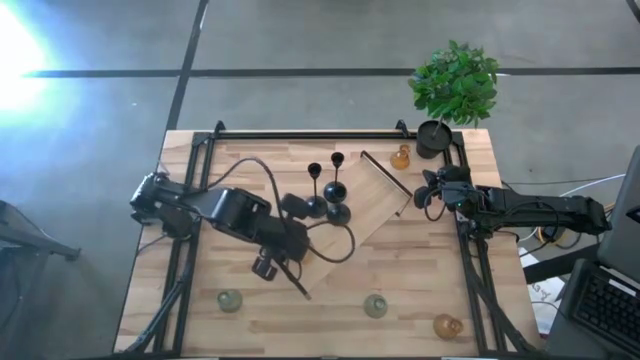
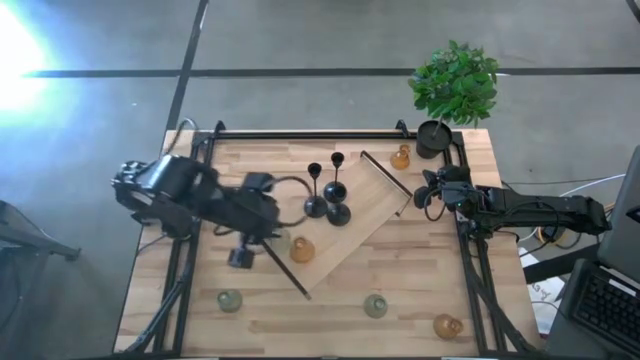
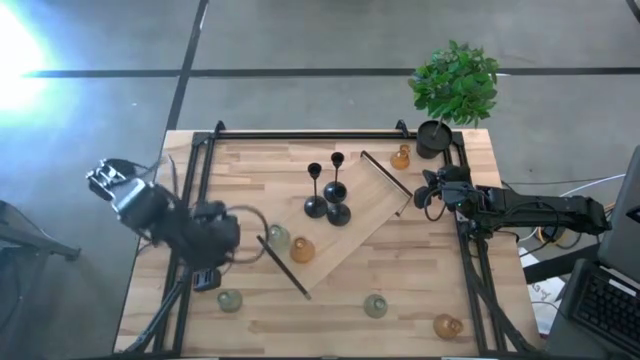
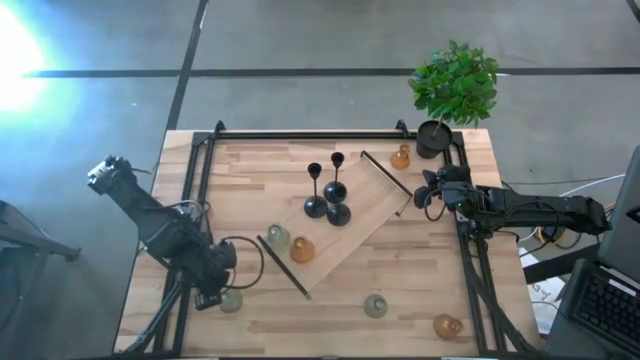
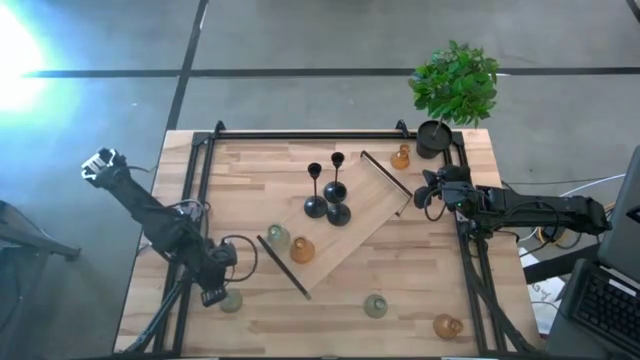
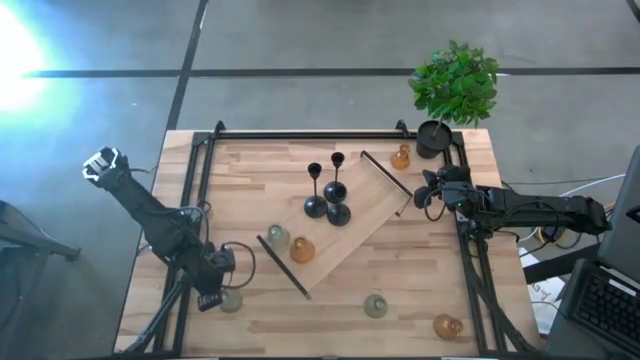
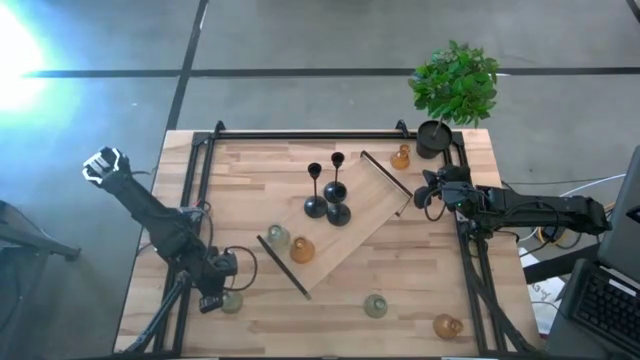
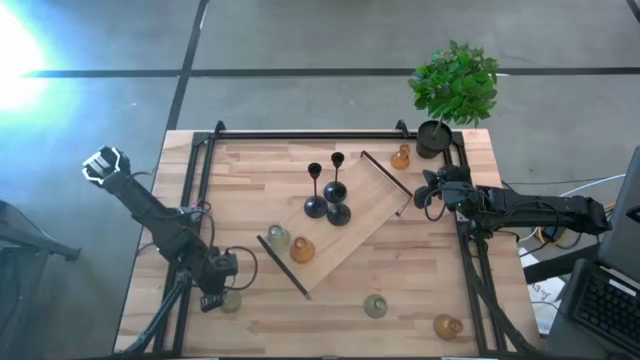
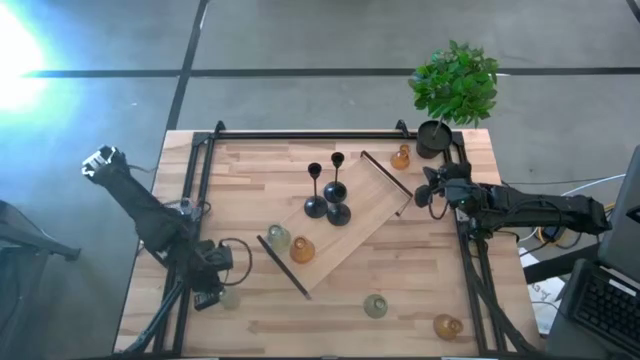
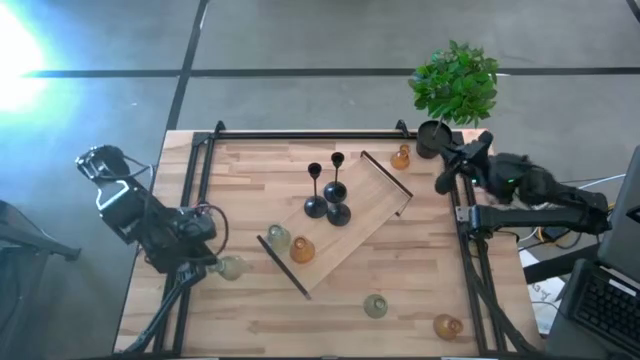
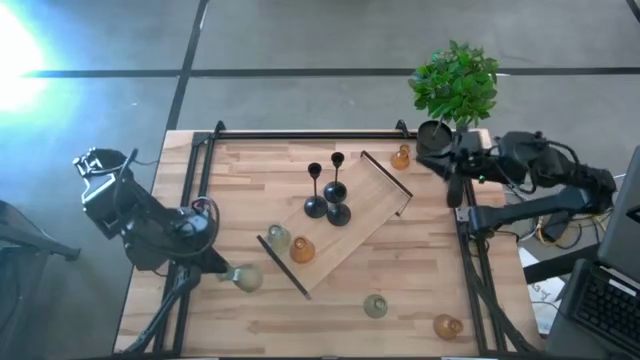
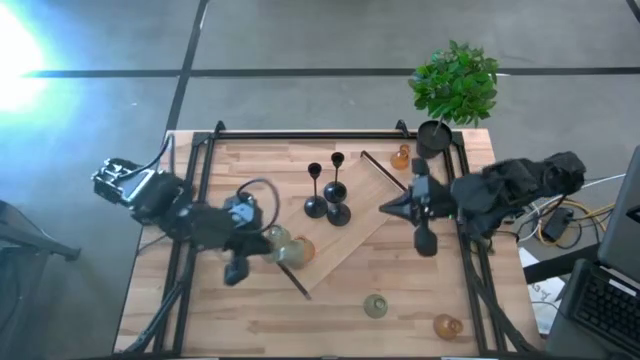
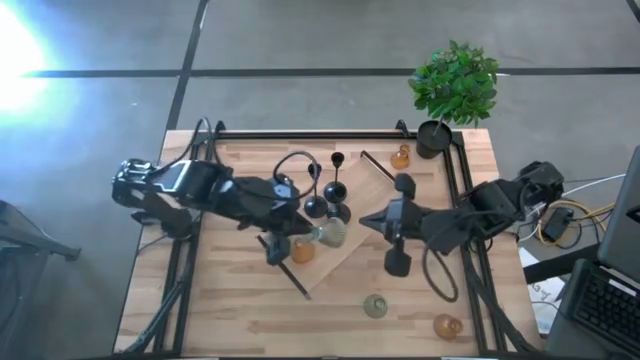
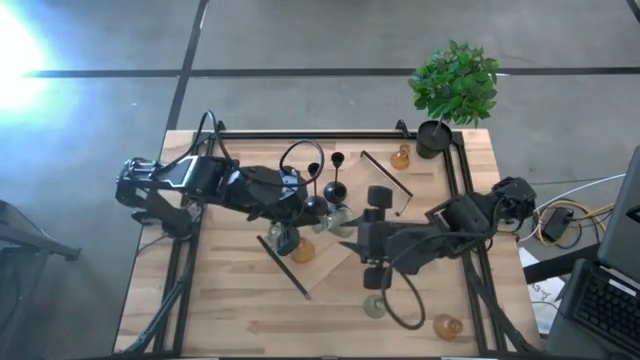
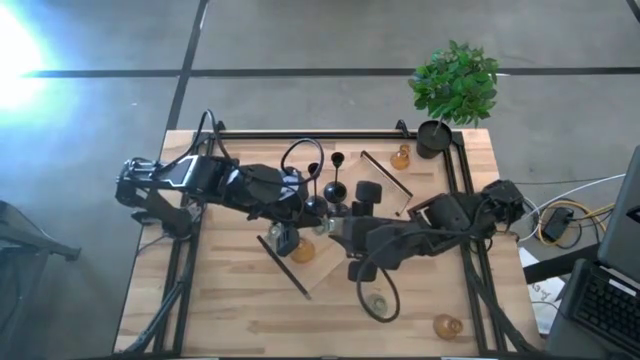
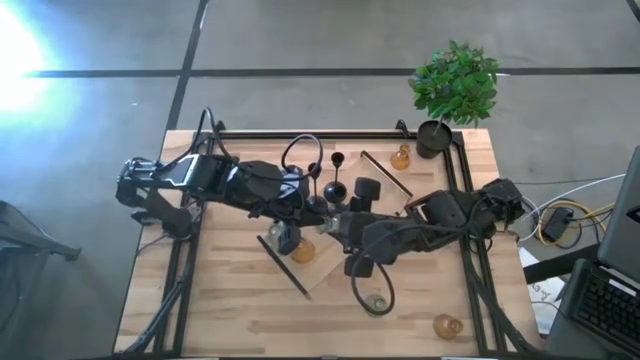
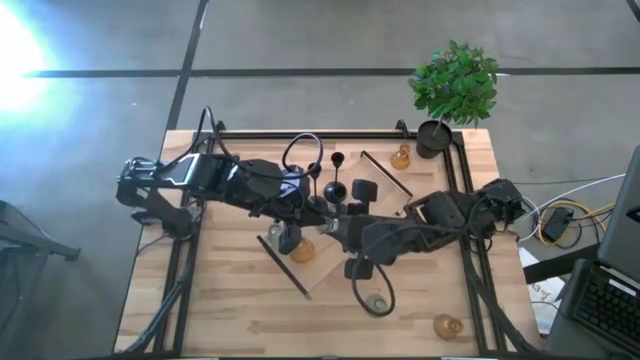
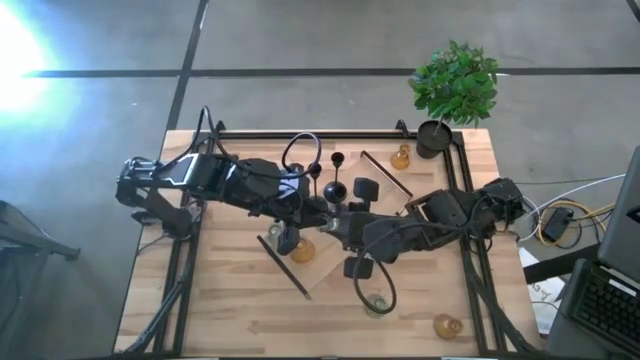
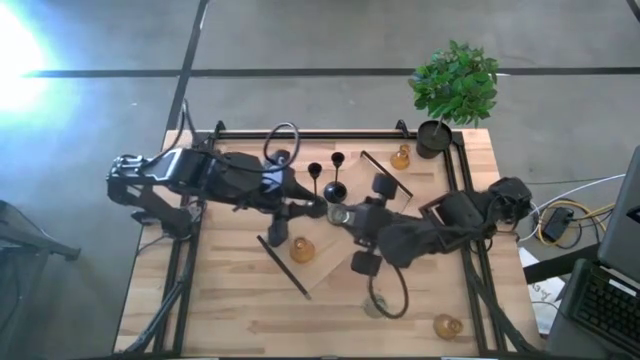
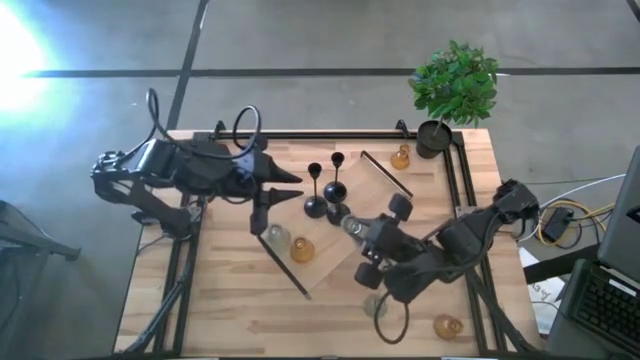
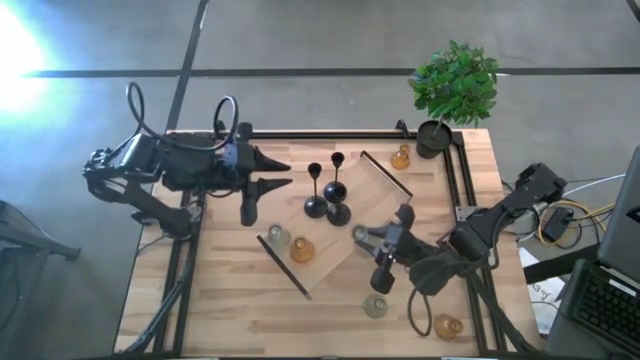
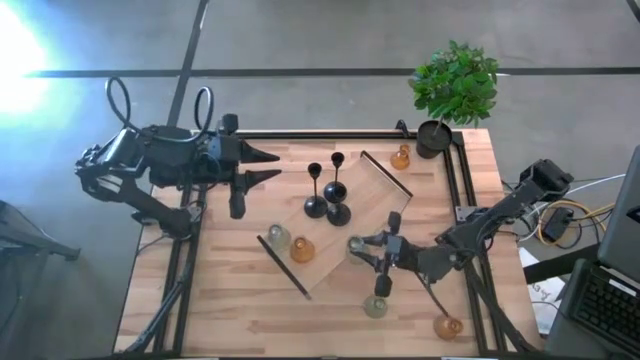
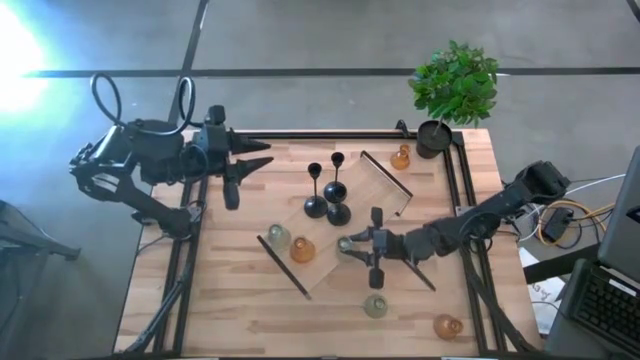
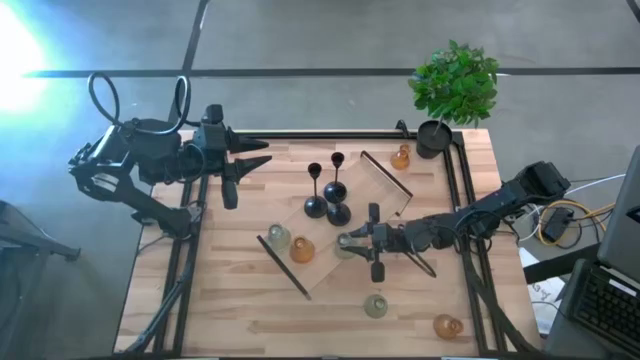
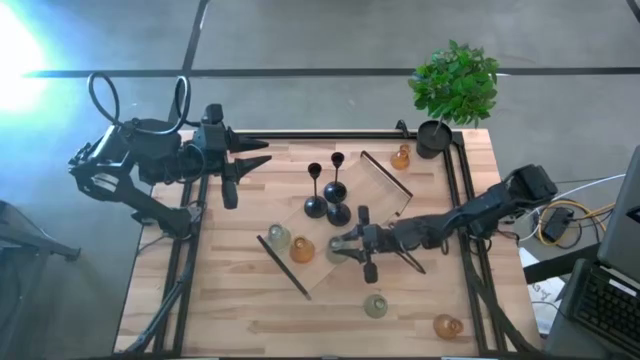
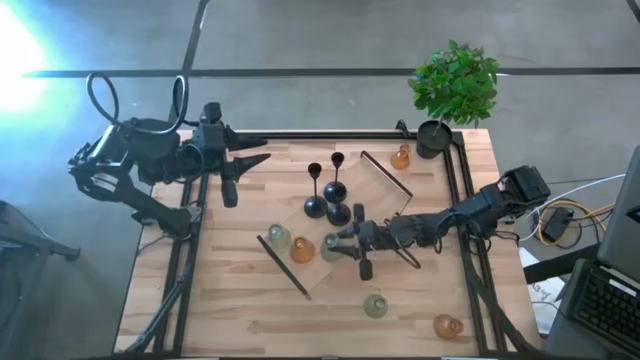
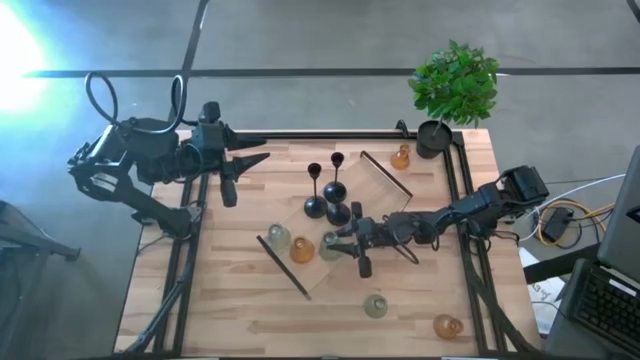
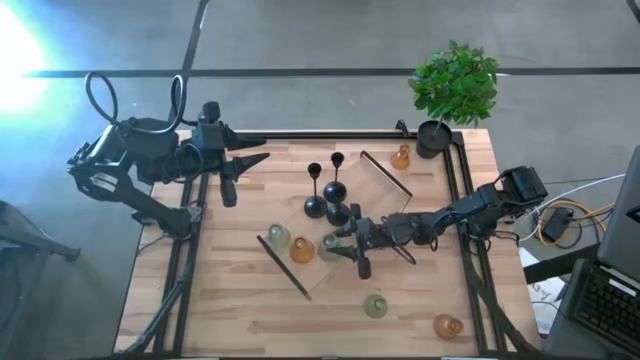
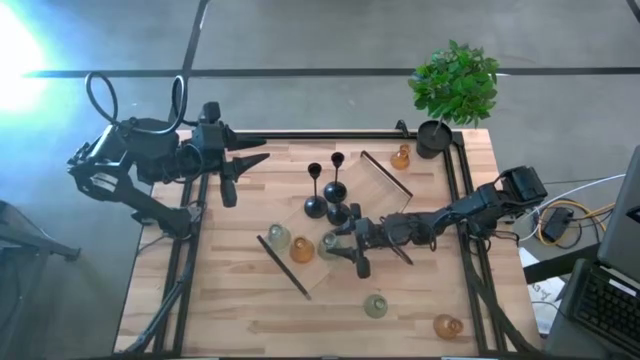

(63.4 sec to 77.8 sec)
Task: Pick & Place candle stick holders
Put the left green candle holder on the shelf

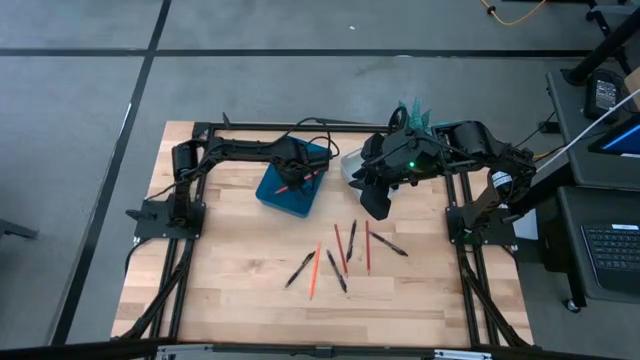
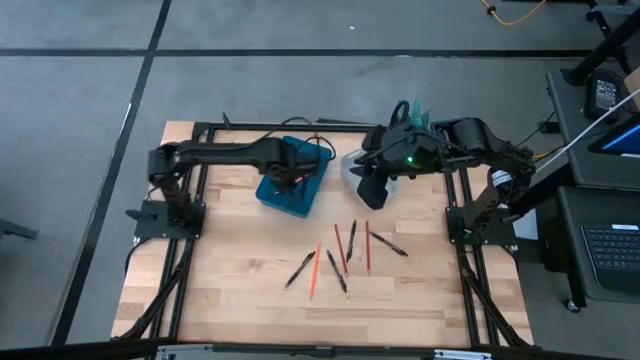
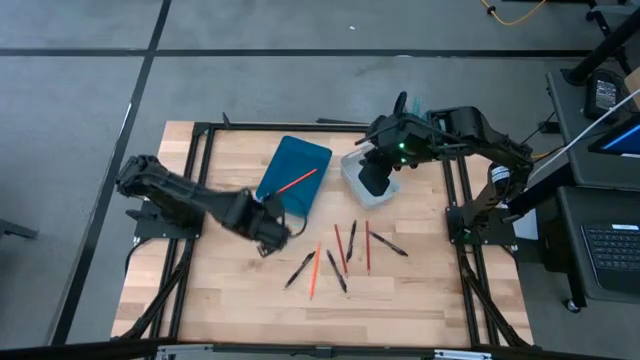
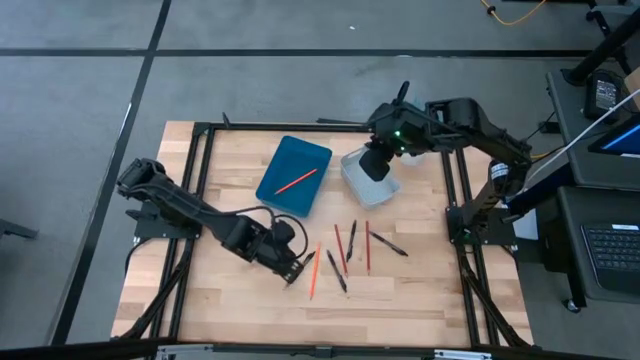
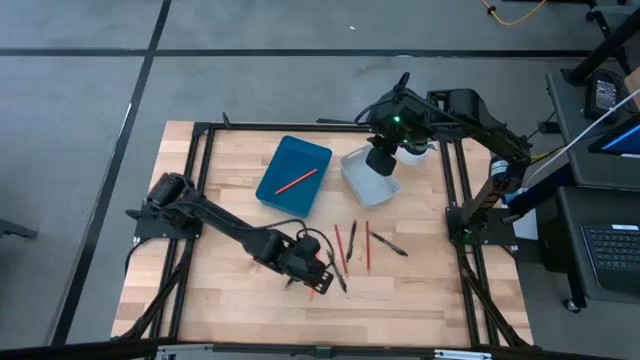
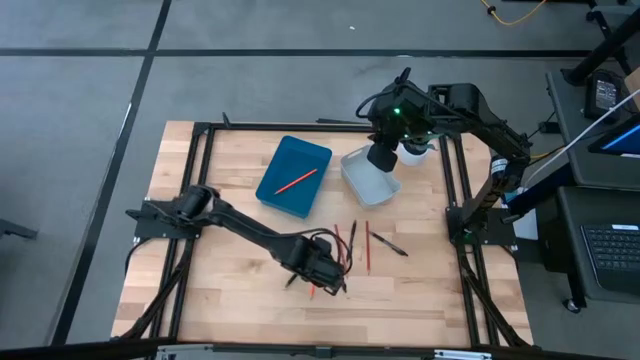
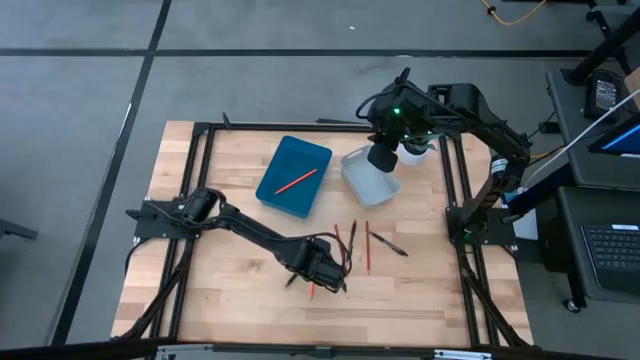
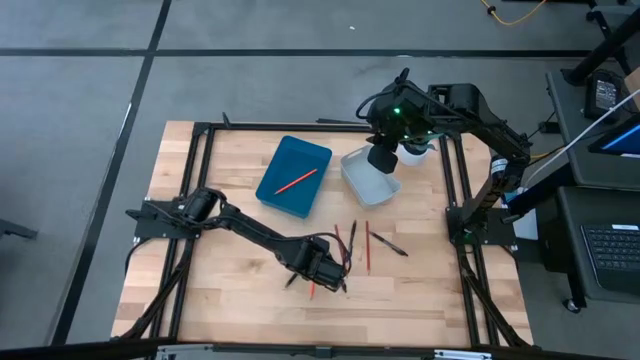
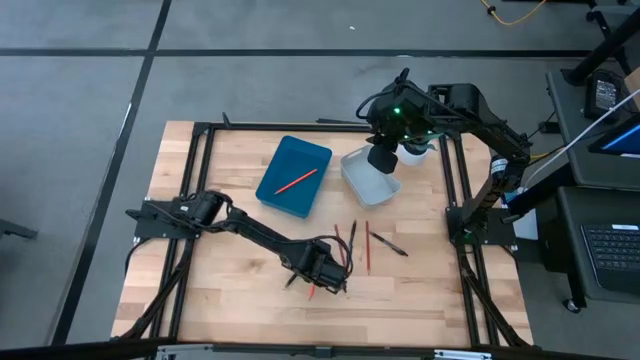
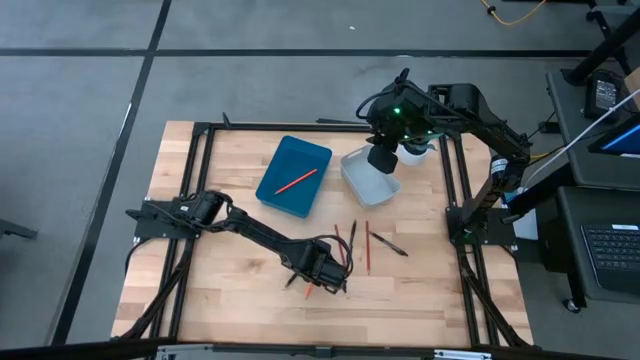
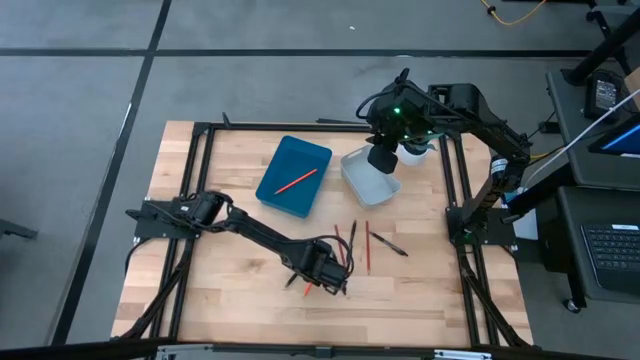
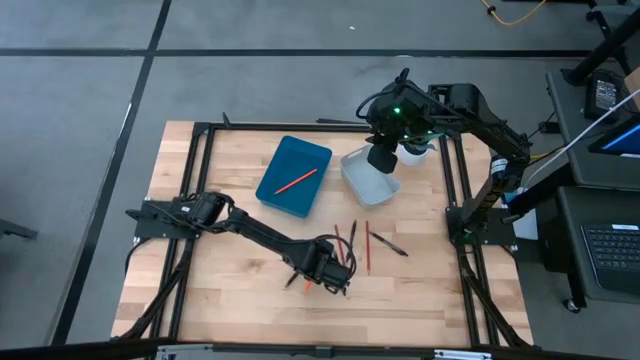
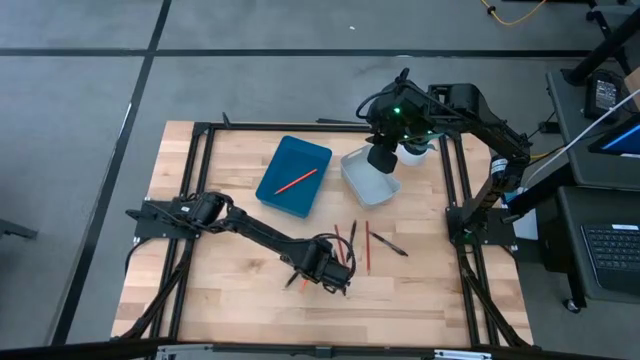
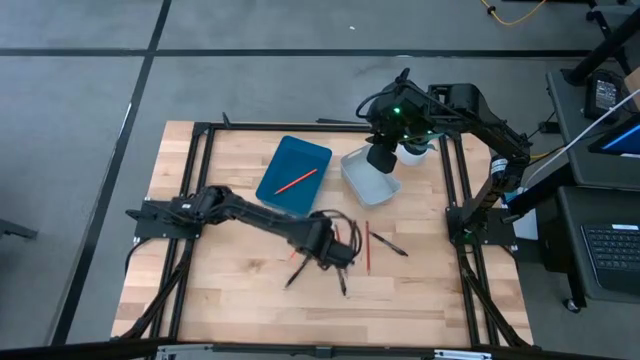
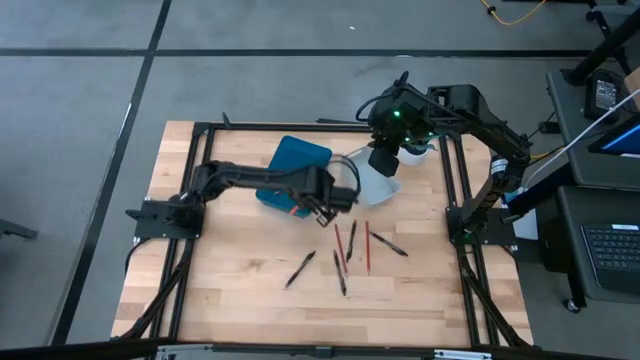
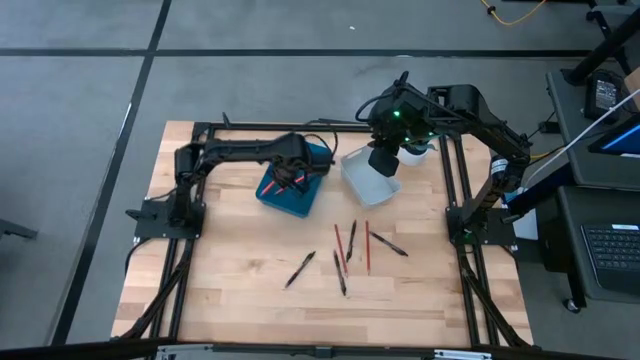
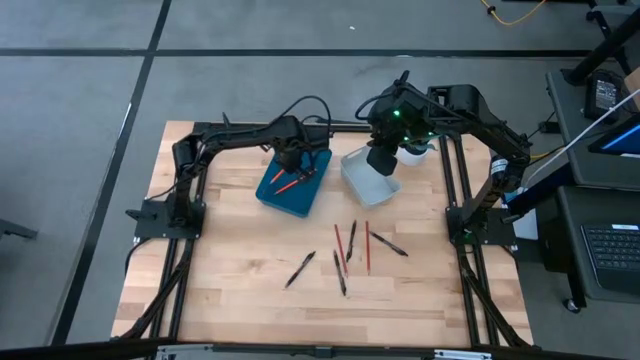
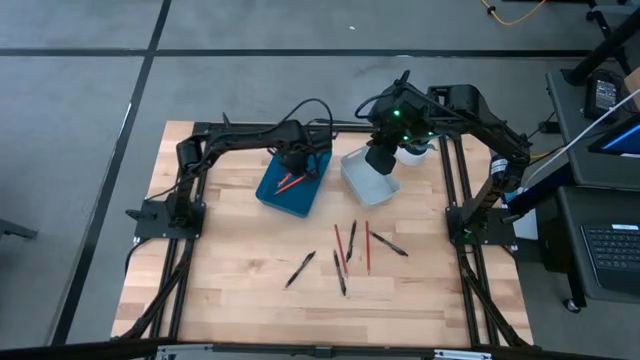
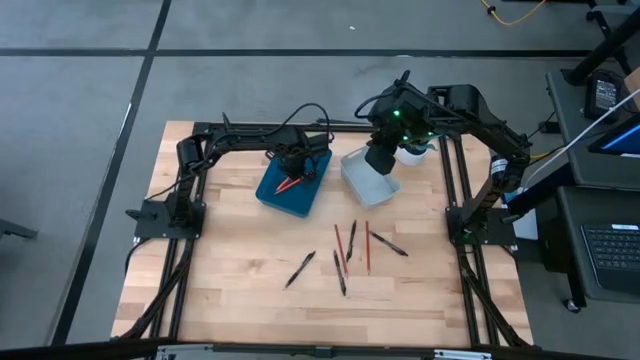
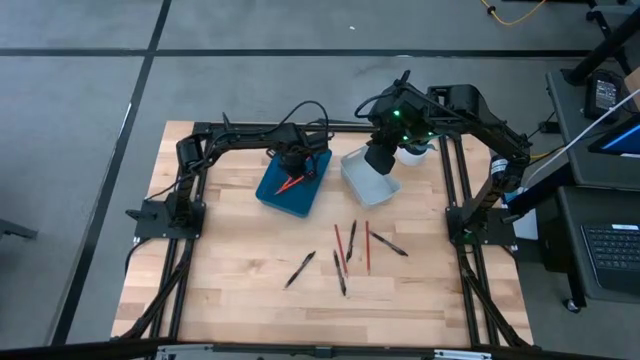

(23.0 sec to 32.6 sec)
Task: Sort pens & pencils
Put the orange pencil into the blue bin
